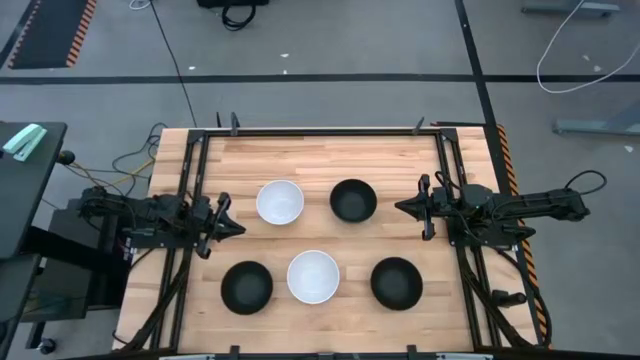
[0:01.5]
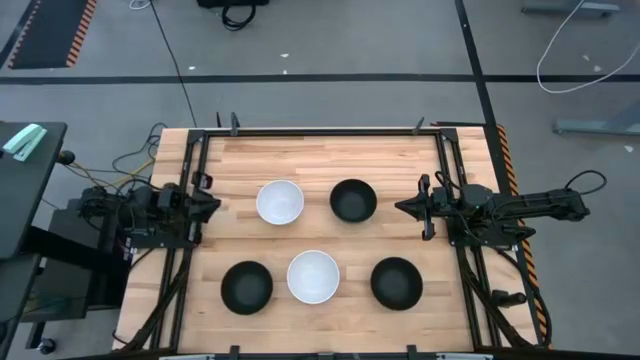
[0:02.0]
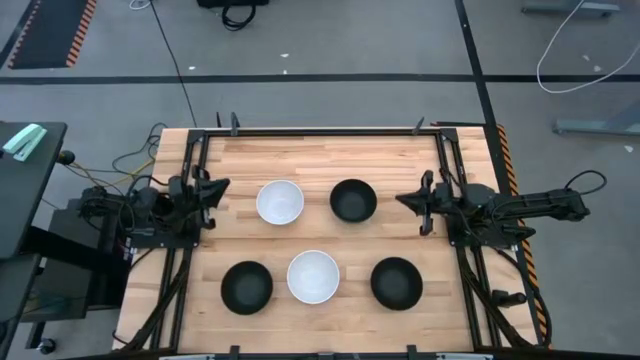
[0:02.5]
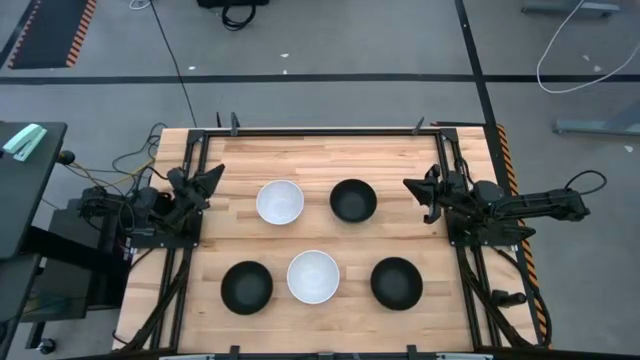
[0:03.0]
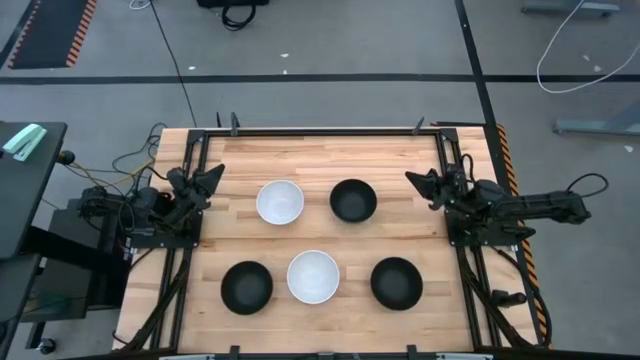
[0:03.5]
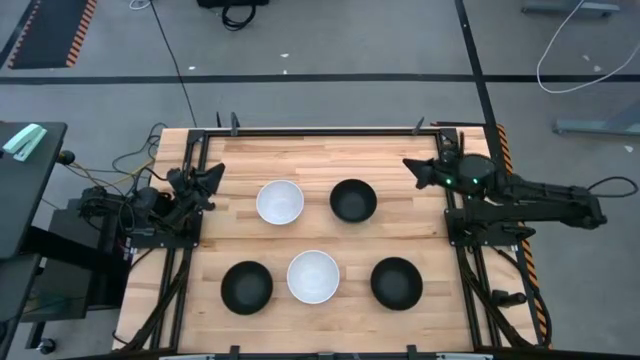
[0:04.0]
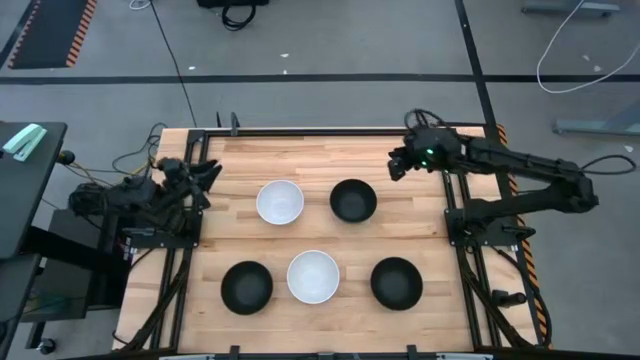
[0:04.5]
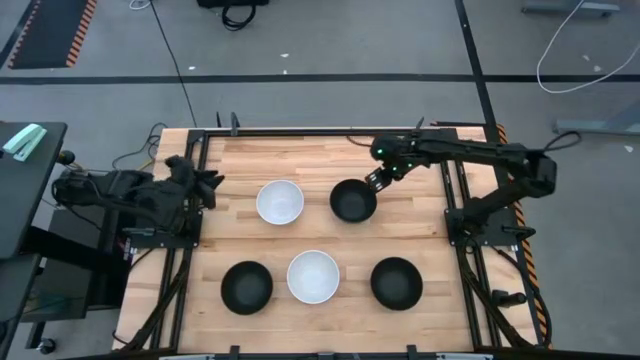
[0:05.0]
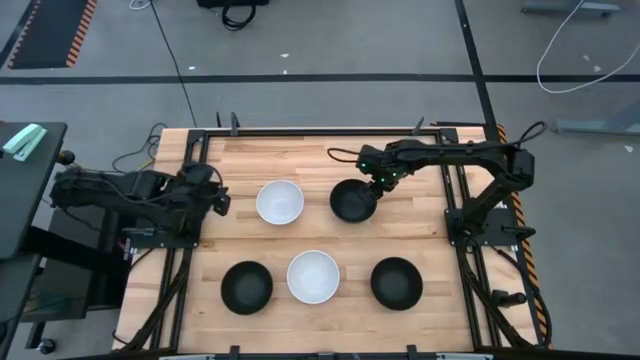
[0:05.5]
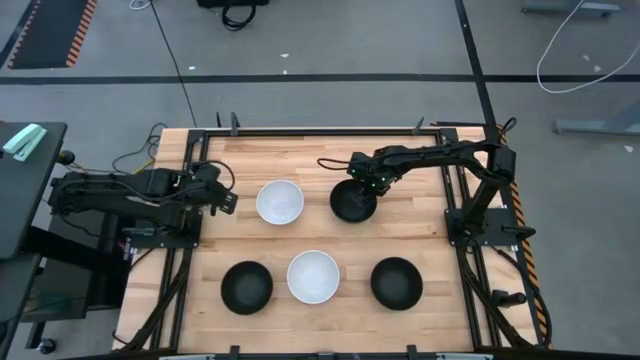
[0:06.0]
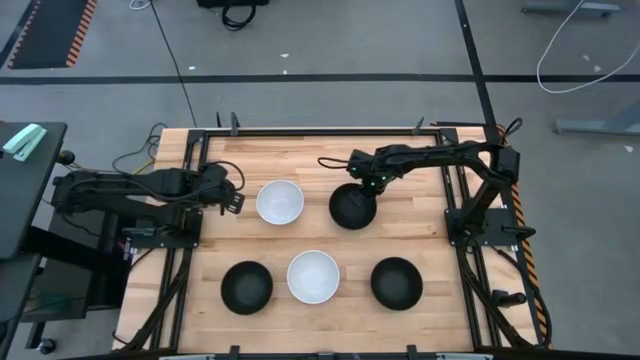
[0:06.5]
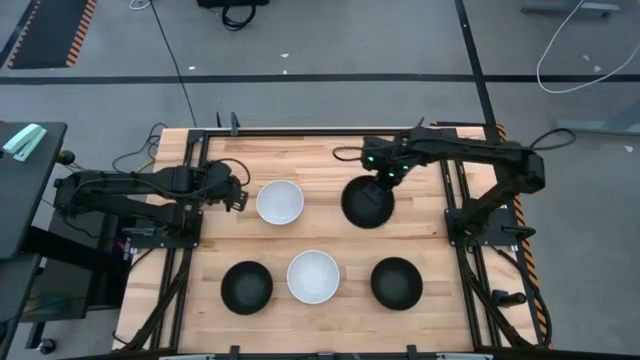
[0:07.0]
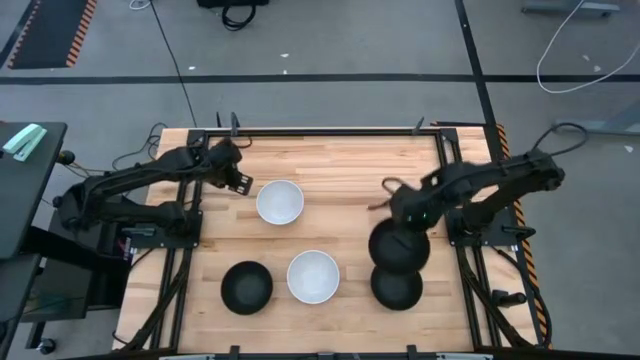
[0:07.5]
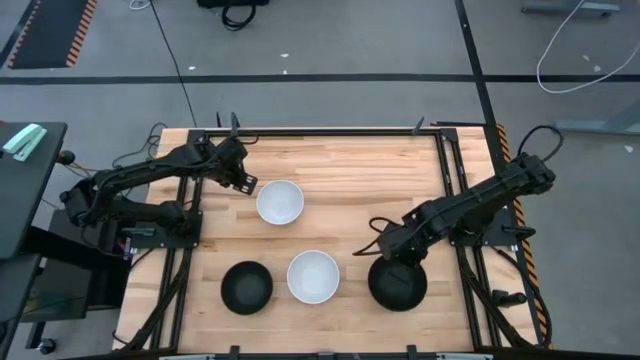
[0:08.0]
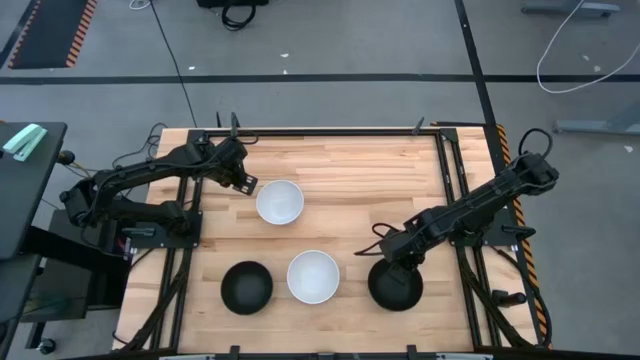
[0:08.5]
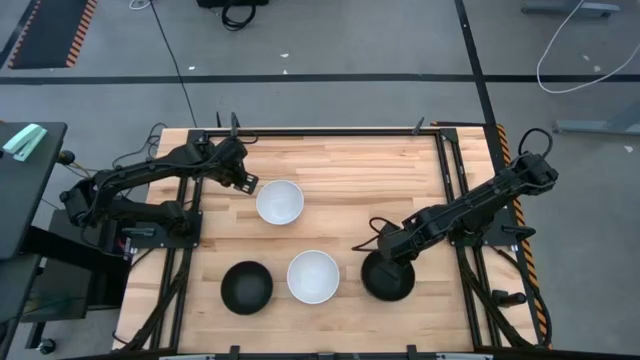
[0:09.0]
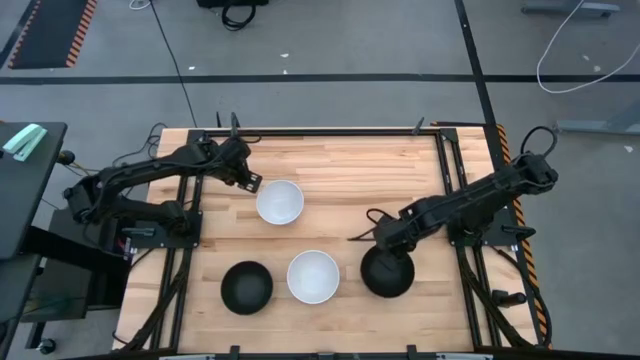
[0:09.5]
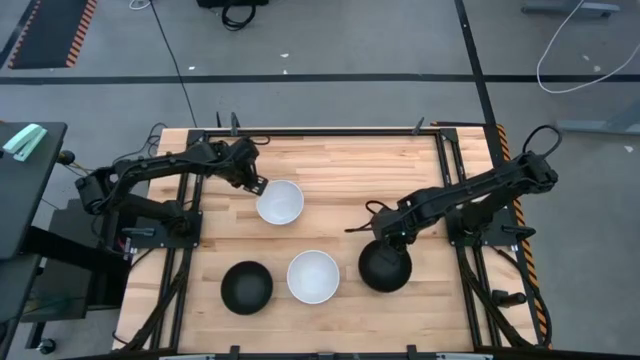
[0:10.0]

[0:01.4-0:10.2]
Task: Nest bowls inside each other
Stack the top black bowl on top of the bottom right black bowl

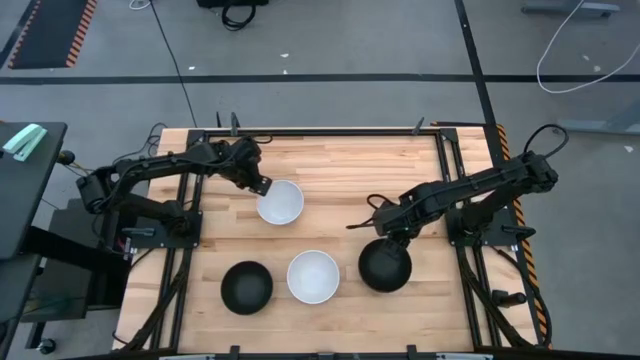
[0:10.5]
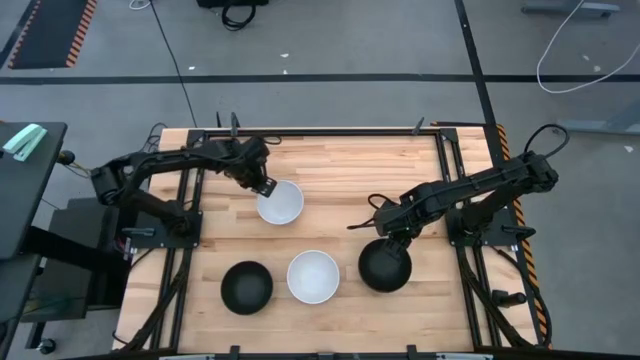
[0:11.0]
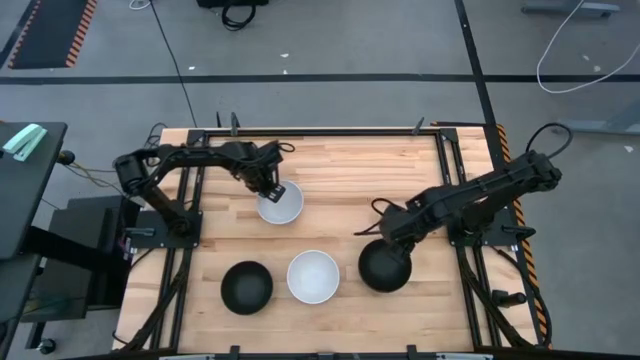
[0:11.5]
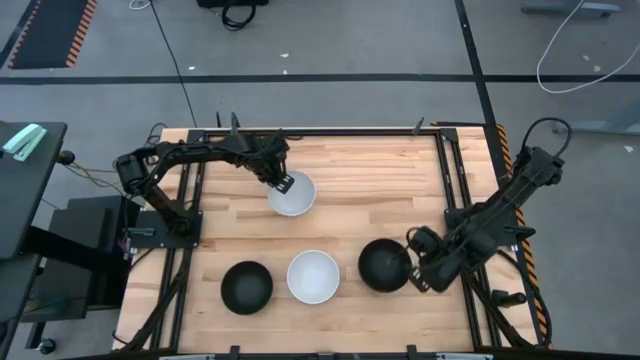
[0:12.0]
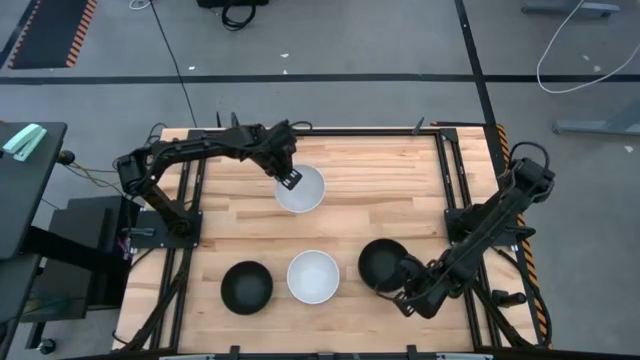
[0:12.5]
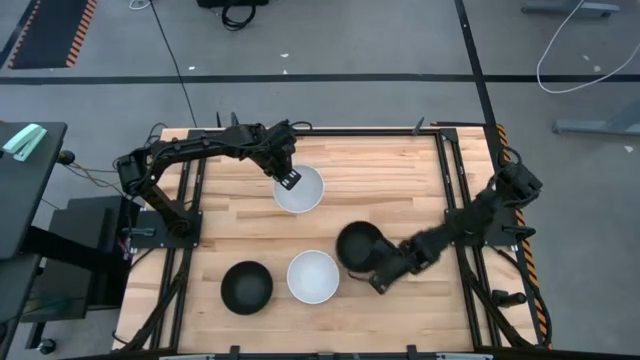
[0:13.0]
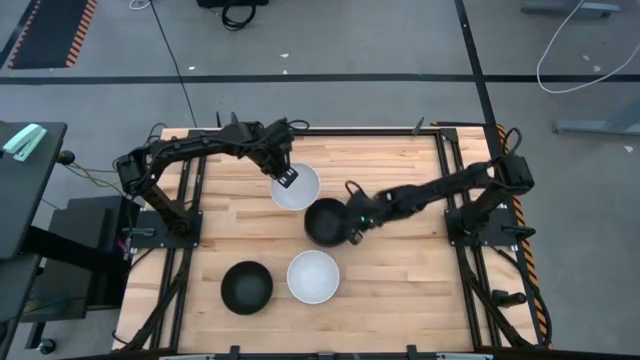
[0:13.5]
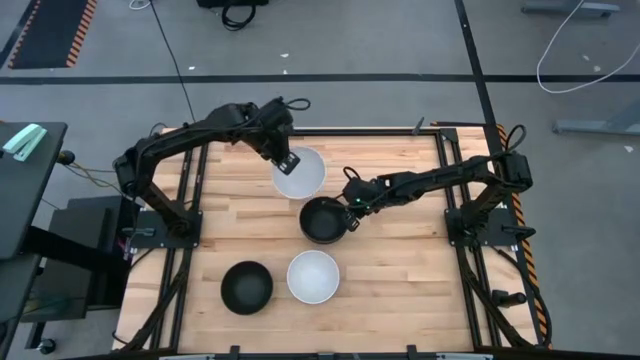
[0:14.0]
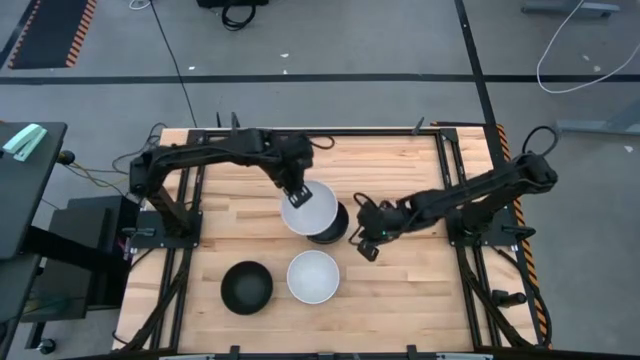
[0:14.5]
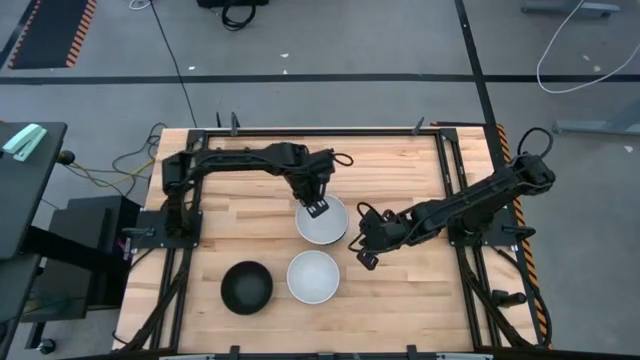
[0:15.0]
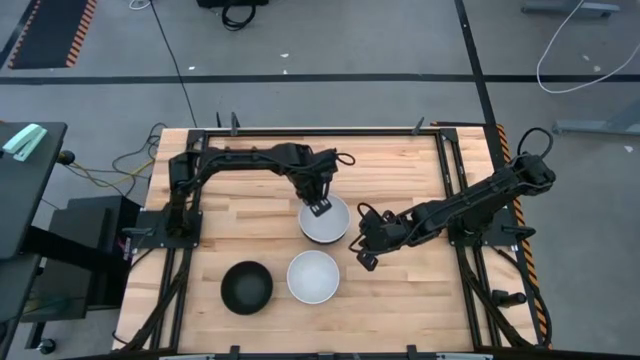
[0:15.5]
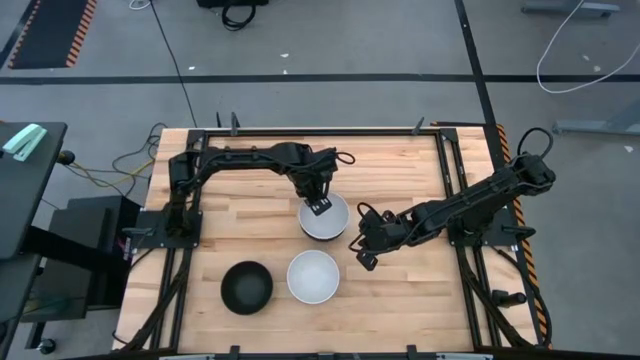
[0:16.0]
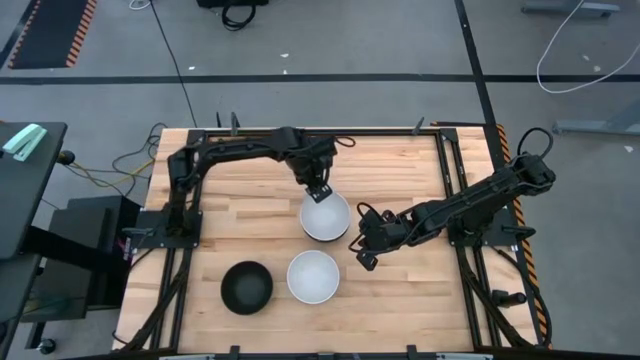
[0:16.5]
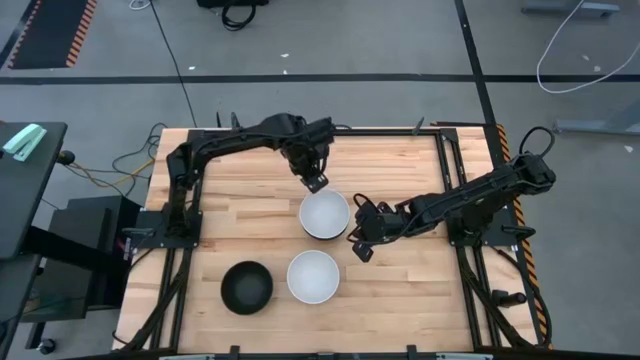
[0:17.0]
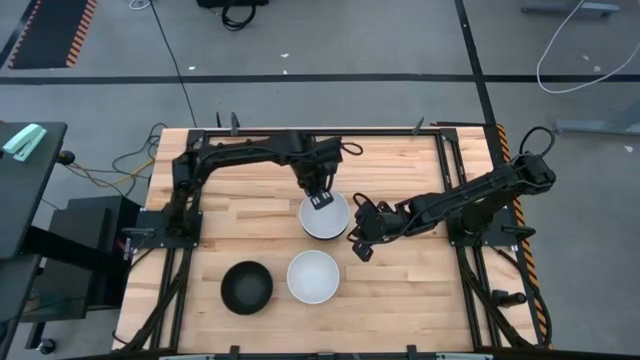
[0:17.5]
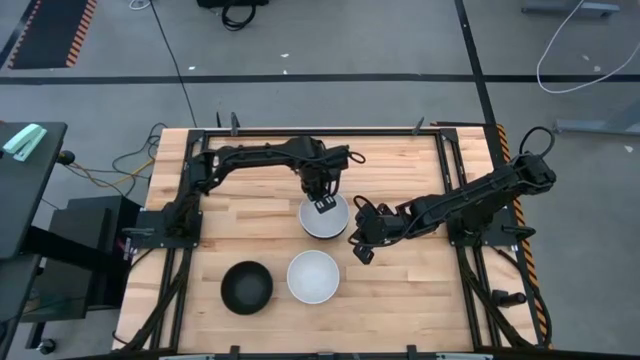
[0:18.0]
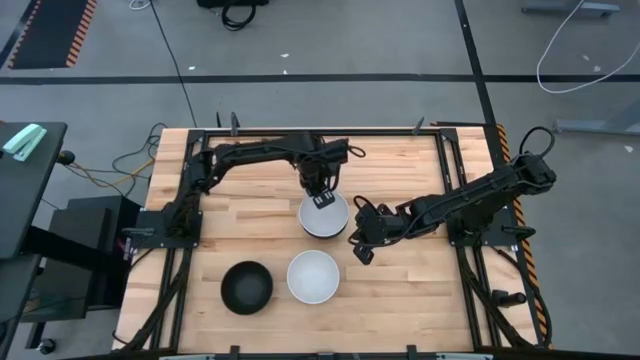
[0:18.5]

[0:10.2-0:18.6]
Stack the top white bowl on top of the stacked black bowls

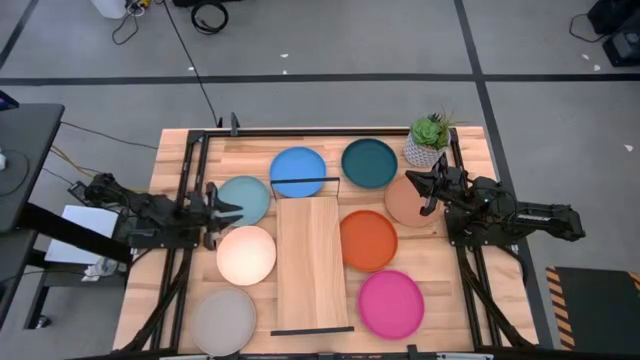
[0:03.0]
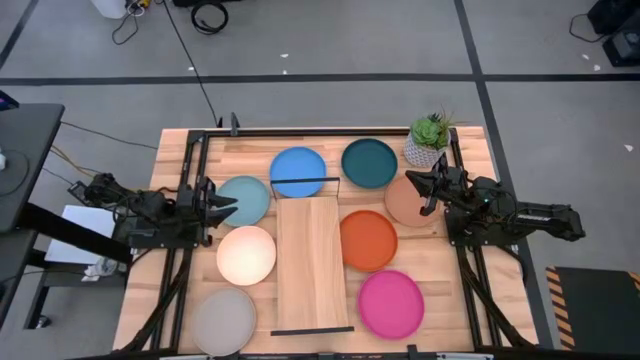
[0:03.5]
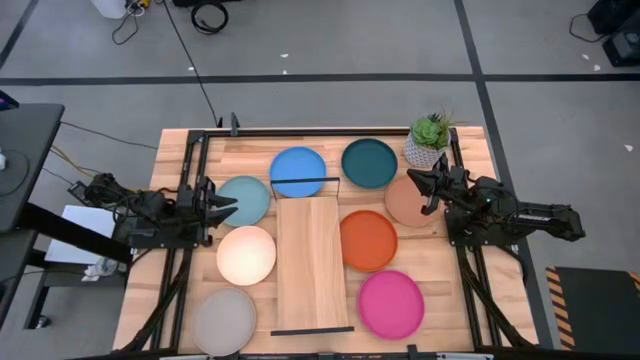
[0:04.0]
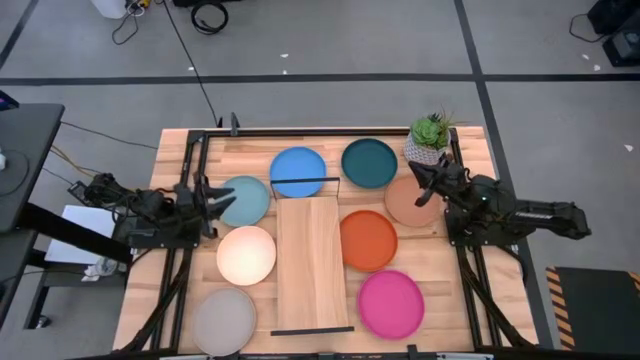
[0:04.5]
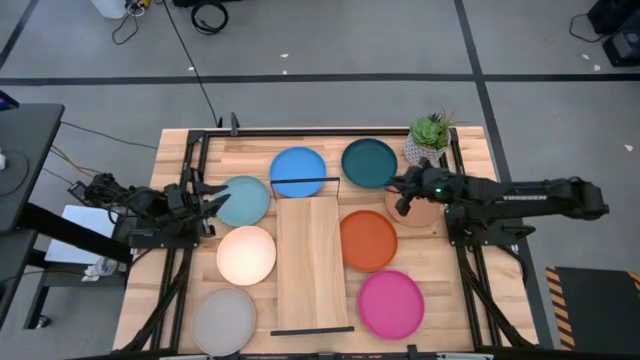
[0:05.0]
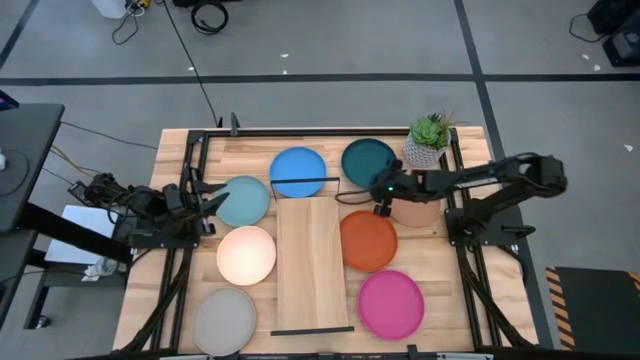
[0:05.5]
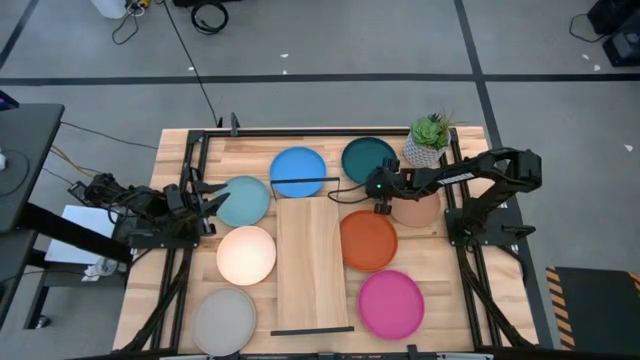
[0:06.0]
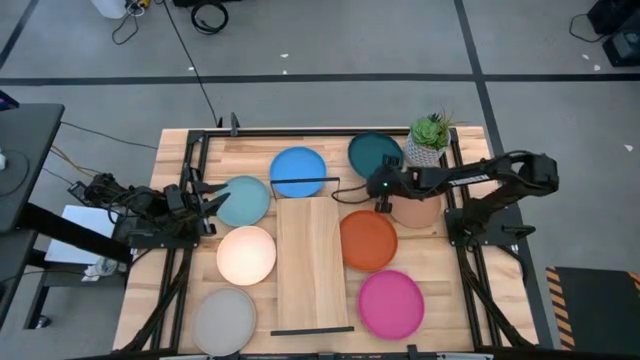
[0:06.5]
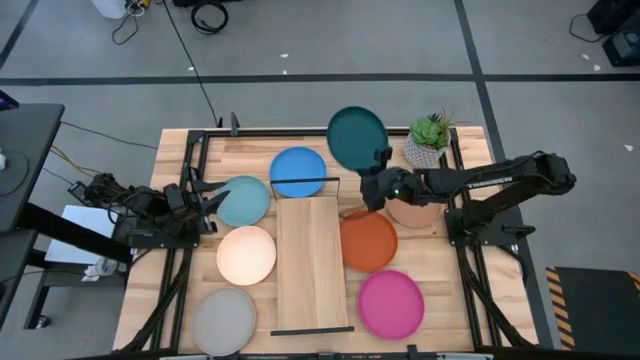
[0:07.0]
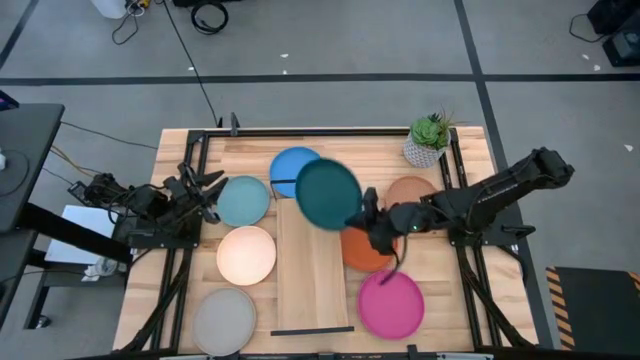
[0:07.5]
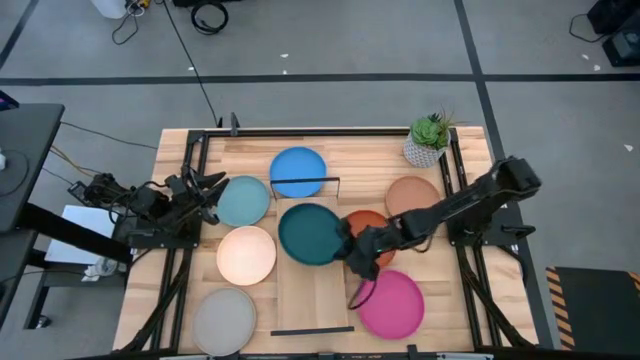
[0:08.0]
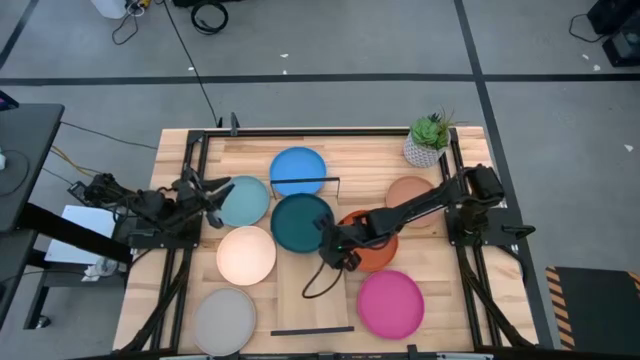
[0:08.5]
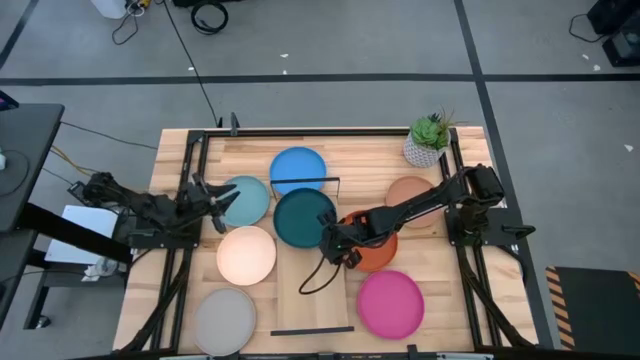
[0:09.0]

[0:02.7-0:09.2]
Task: Place and stack plates onto a shelf
Put the dark green plate on the shelf
